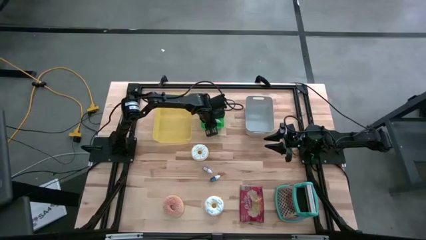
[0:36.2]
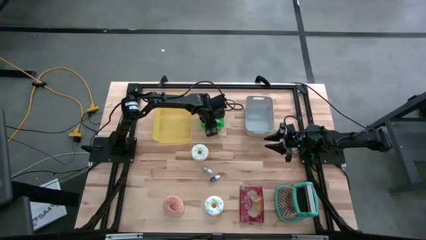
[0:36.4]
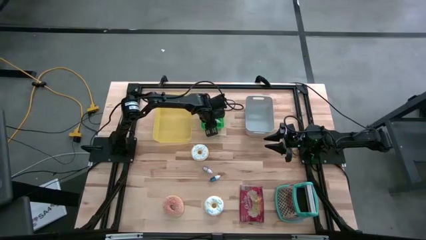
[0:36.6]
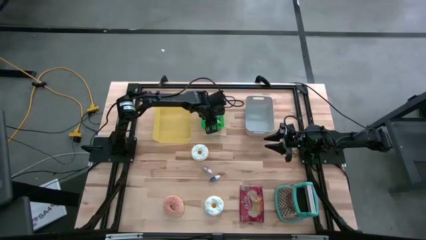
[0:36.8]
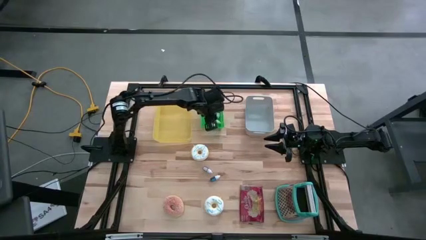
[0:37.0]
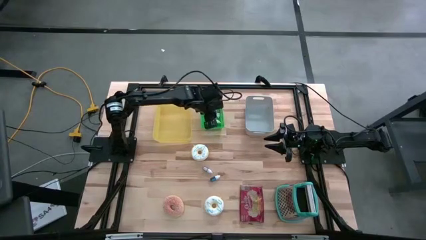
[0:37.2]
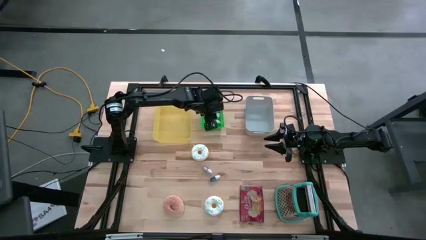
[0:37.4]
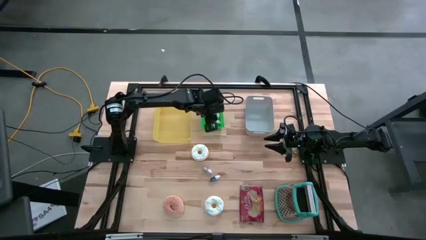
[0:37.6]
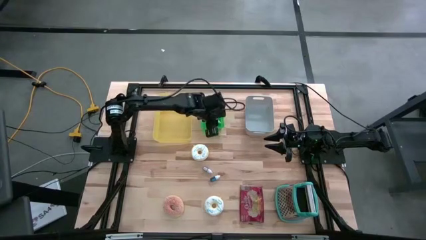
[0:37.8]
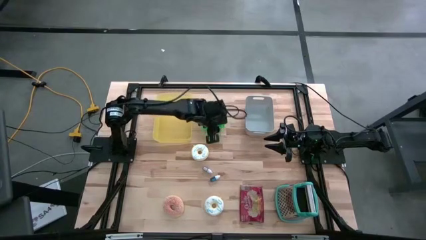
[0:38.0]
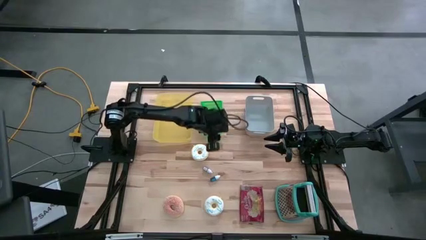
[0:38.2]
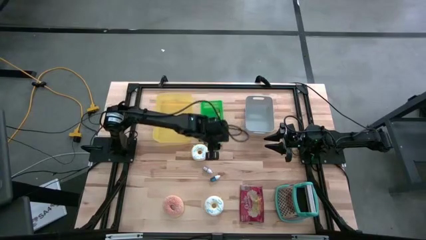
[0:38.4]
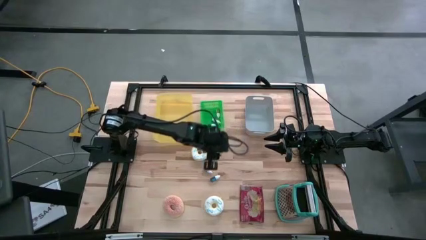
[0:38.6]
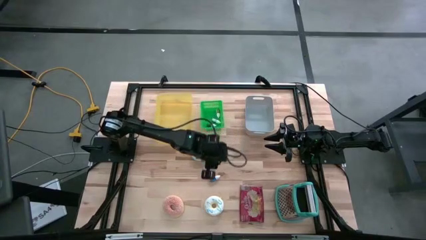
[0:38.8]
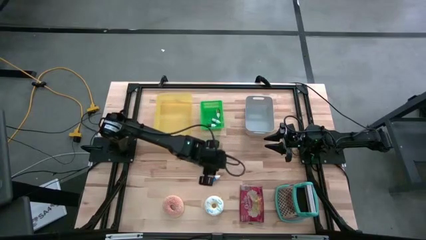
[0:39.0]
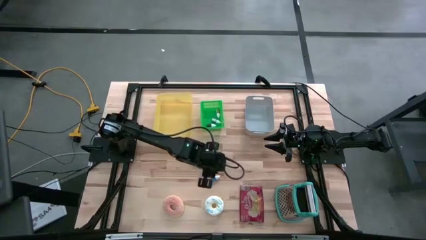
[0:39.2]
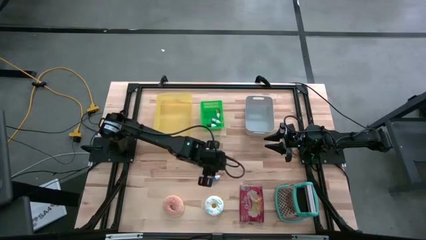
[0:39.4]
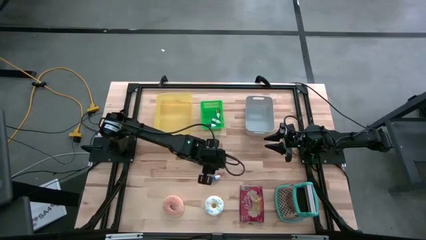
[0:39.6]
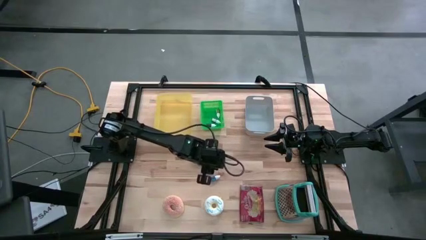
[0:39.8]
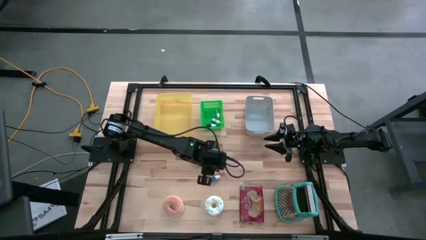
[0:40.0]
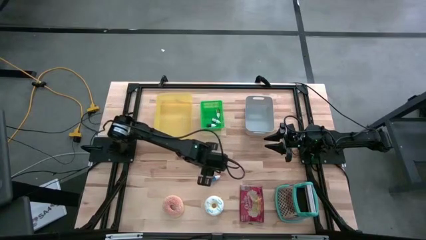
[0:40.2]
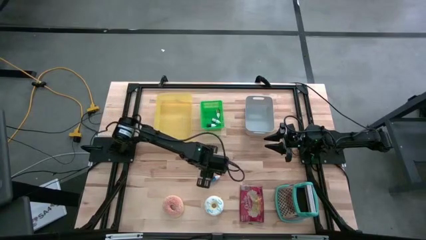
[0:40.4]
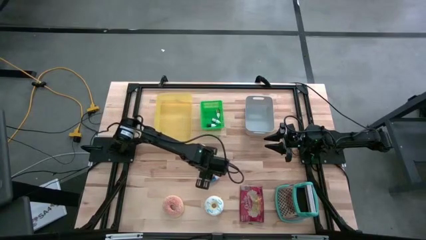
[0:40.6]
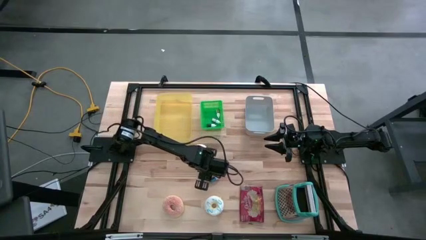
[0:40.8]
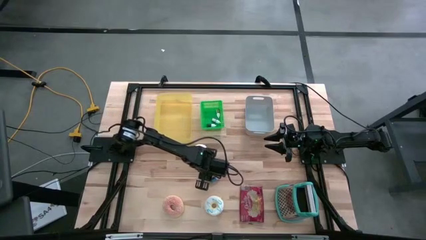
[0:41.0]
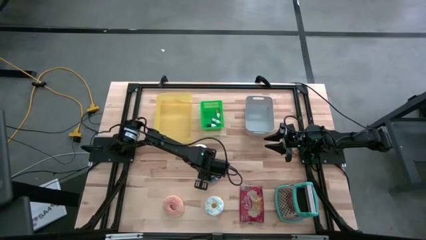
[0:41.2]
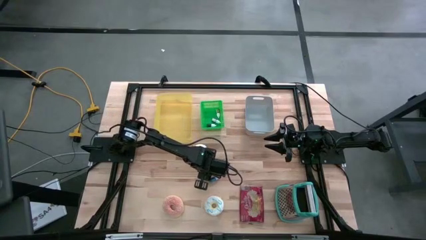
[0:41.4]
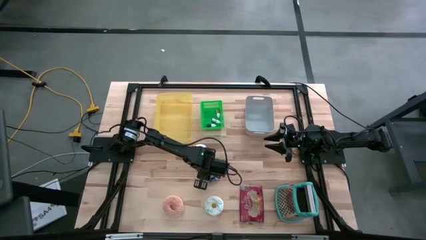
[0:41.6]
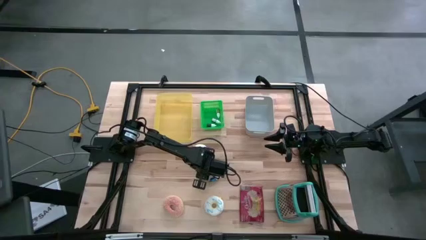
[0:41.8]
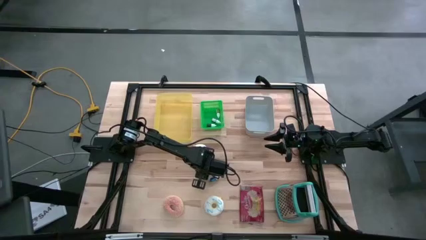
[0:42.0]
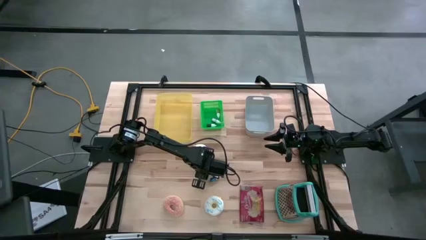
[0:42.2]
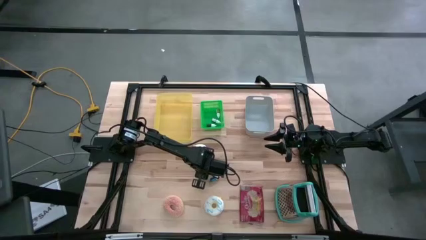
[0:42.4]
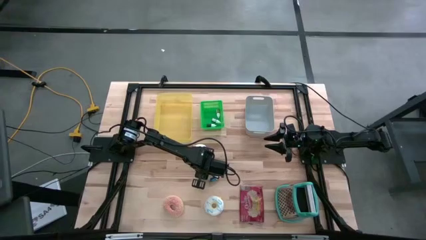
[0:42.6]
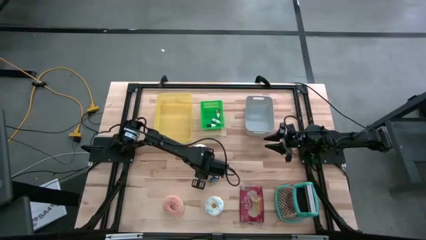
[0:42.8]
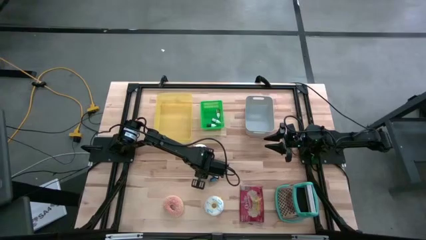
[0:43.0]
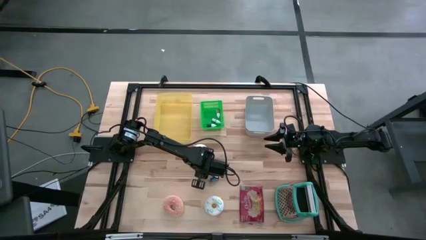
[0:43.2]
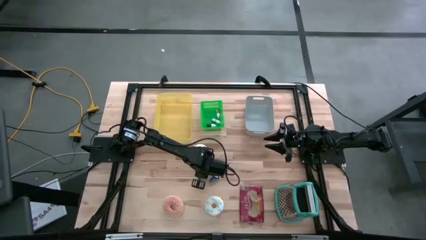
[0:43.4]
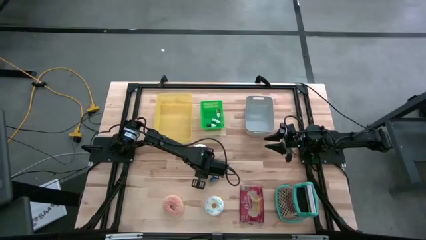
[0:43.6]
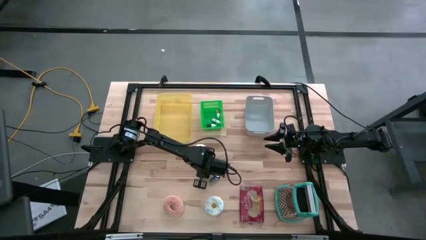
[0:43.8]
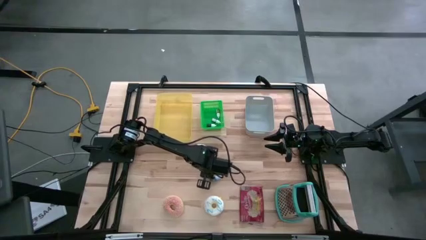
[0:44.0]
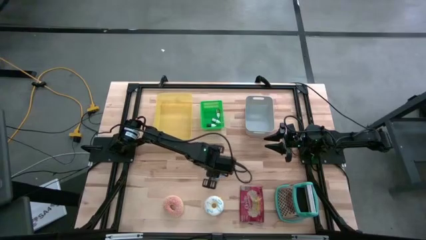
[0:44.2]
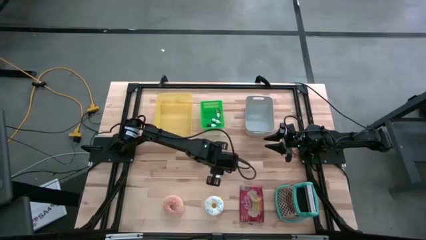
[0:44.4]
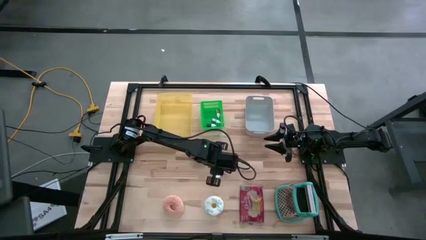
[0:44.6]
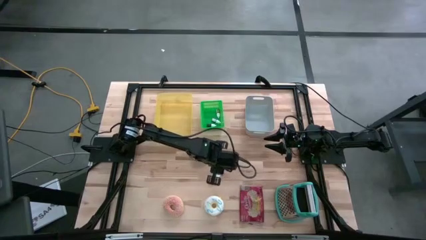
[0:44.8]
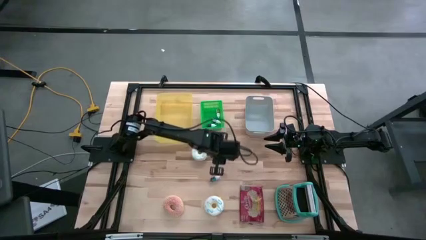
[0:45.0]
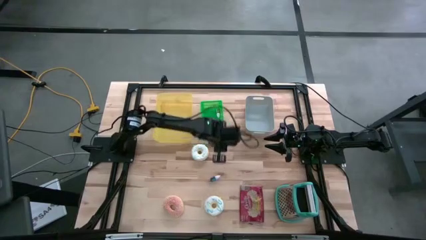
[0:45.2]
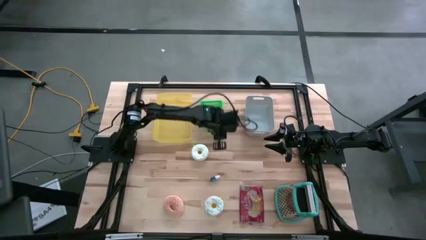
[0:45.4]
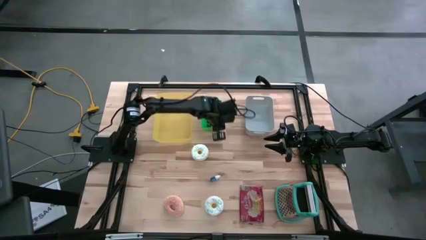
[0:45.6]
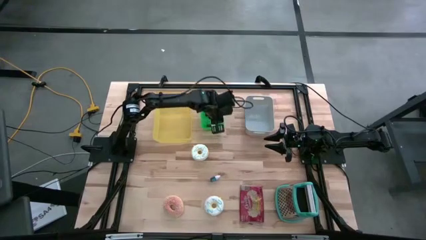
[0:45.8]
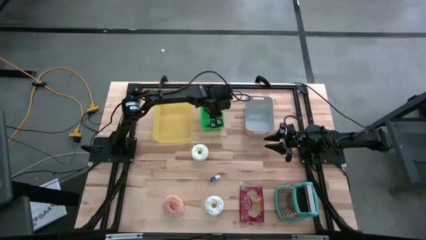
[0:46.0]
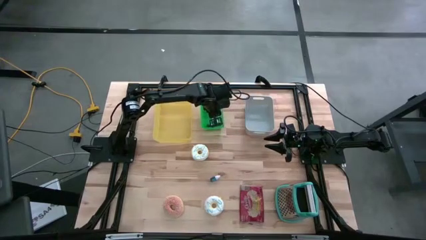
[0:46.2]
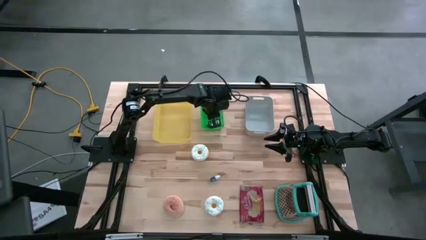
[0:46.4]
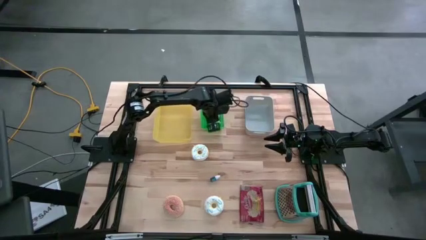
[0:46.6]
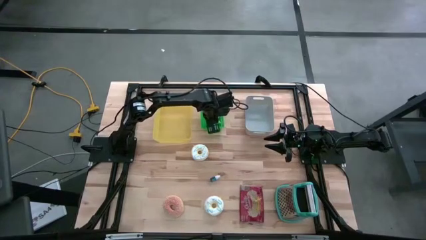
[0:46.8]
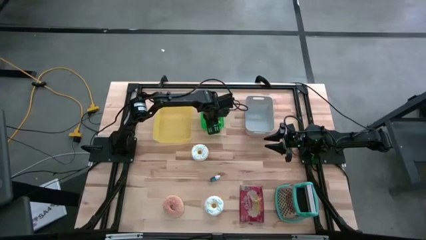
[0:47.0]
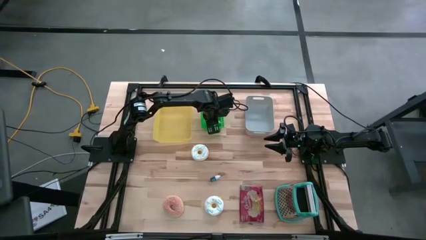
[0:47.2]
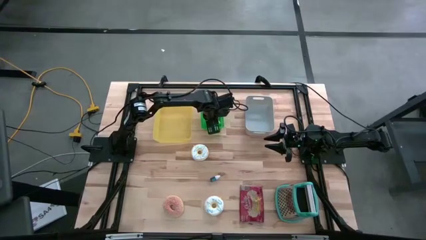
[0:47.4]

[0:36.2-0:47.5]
Put the red food coloring bottle into the green bin
